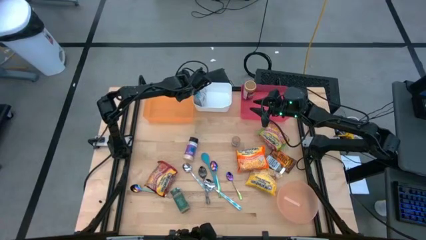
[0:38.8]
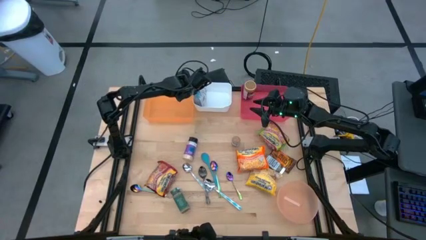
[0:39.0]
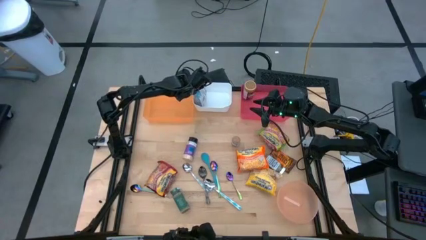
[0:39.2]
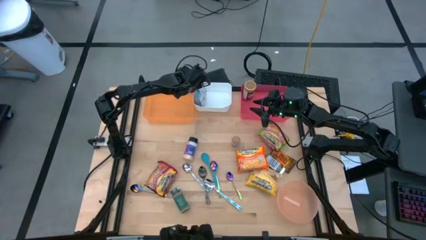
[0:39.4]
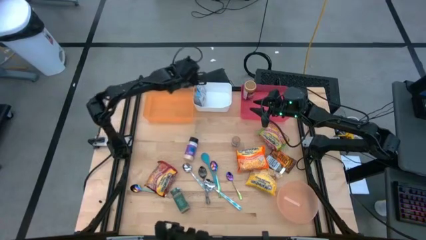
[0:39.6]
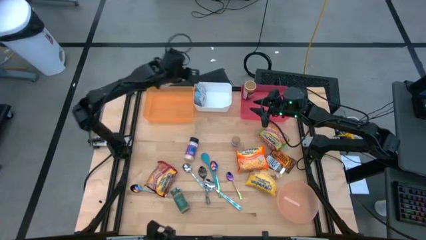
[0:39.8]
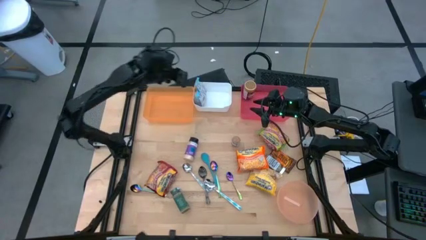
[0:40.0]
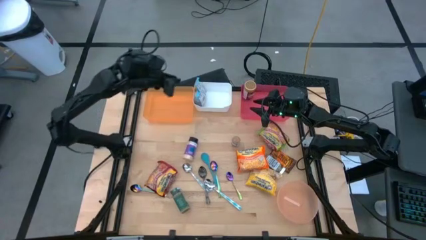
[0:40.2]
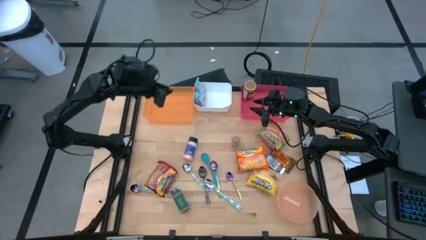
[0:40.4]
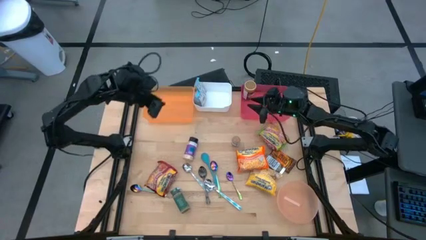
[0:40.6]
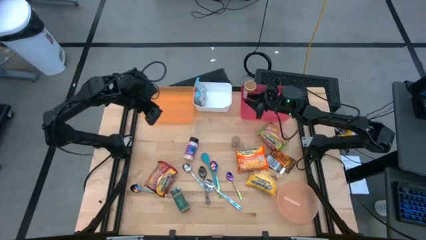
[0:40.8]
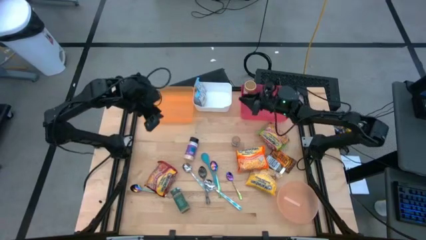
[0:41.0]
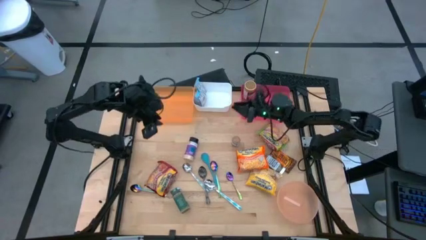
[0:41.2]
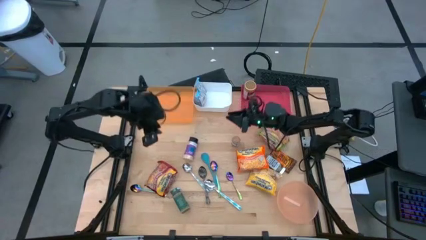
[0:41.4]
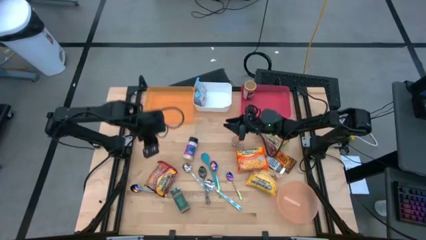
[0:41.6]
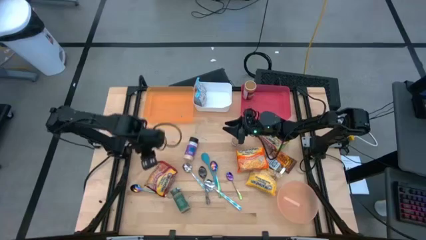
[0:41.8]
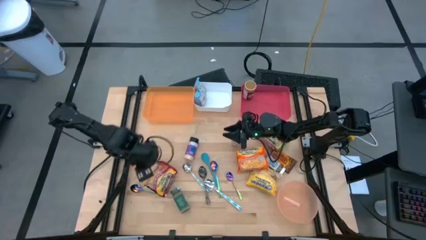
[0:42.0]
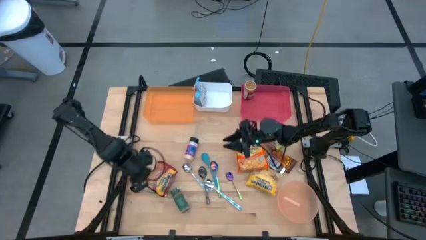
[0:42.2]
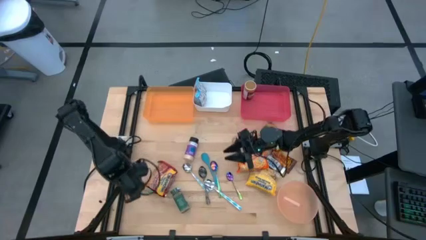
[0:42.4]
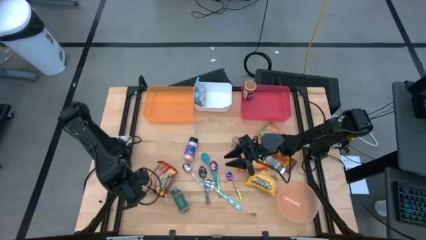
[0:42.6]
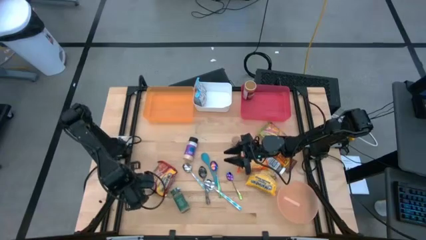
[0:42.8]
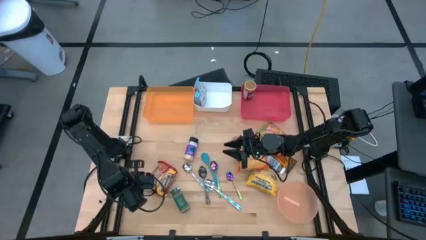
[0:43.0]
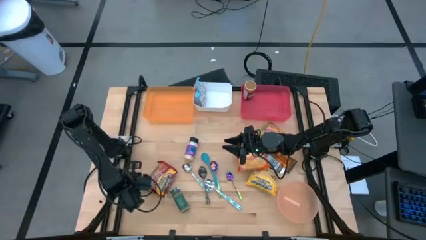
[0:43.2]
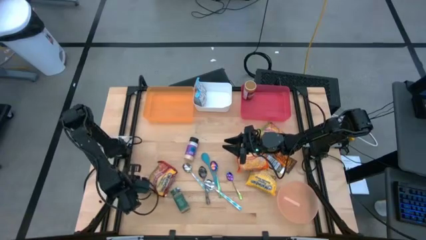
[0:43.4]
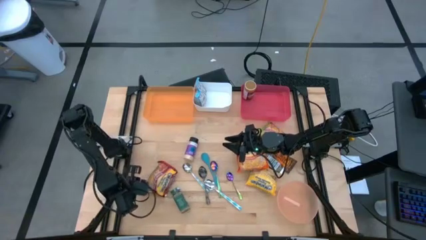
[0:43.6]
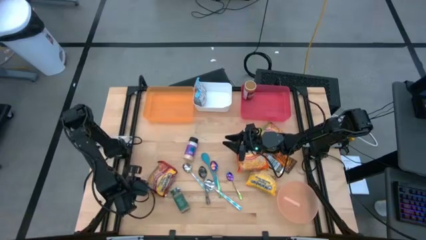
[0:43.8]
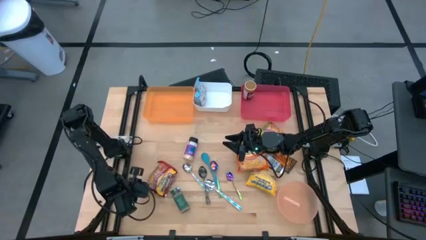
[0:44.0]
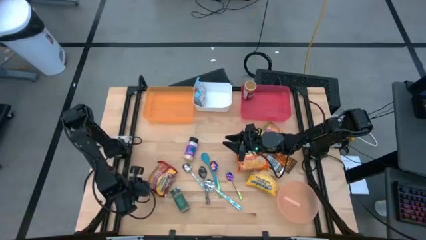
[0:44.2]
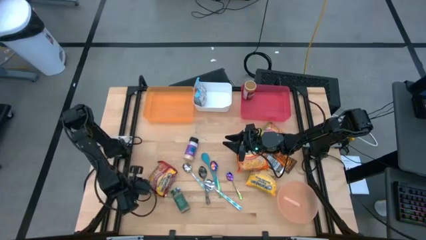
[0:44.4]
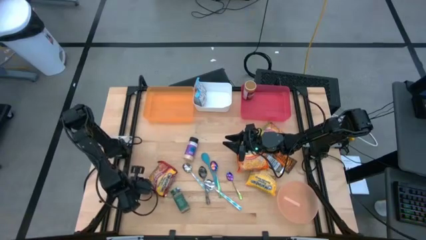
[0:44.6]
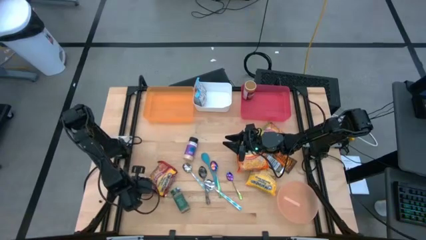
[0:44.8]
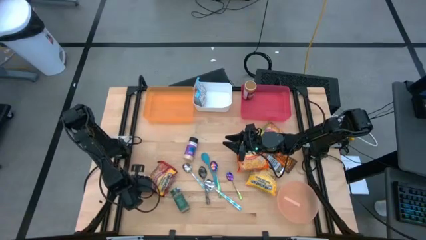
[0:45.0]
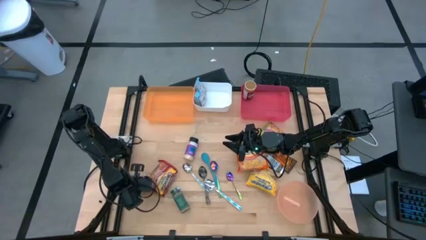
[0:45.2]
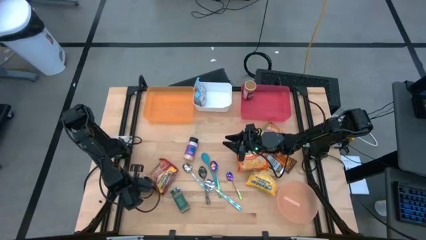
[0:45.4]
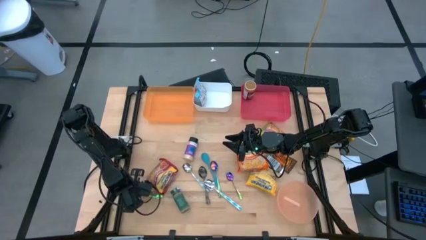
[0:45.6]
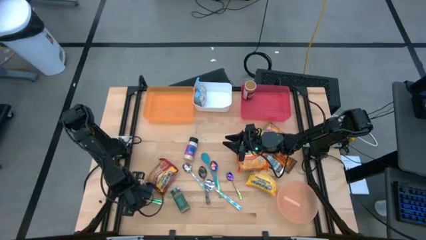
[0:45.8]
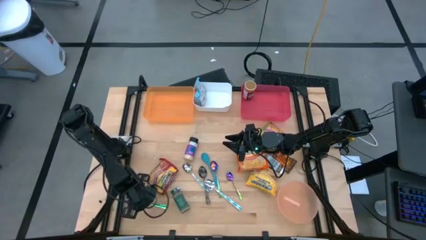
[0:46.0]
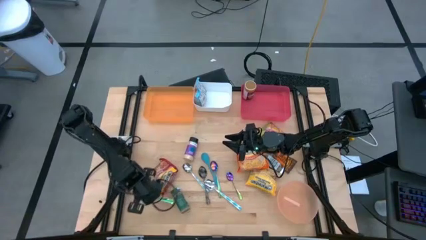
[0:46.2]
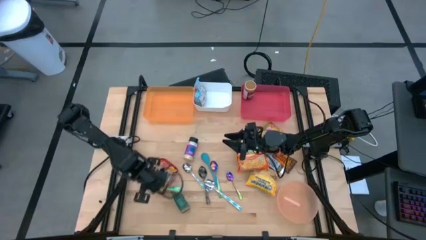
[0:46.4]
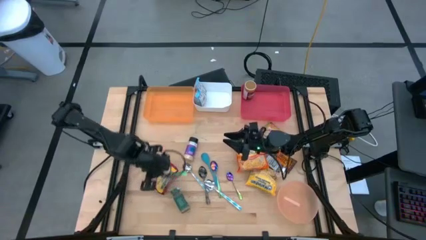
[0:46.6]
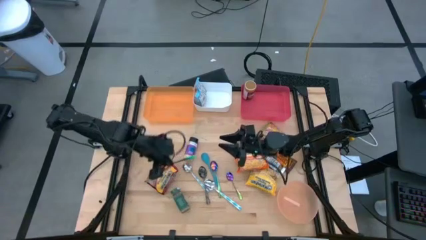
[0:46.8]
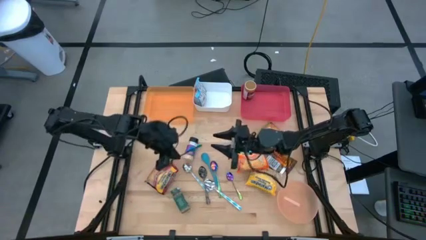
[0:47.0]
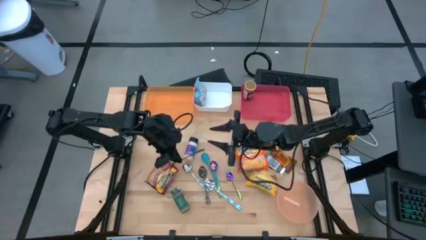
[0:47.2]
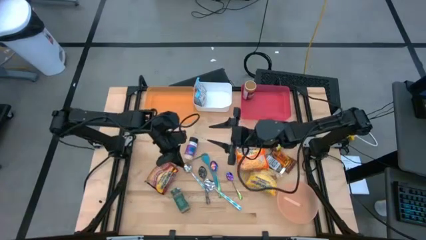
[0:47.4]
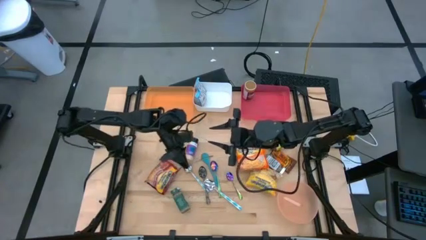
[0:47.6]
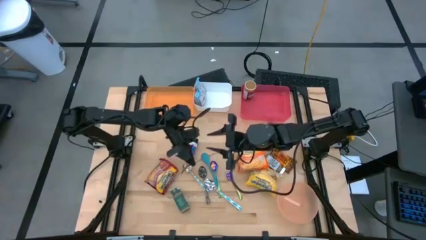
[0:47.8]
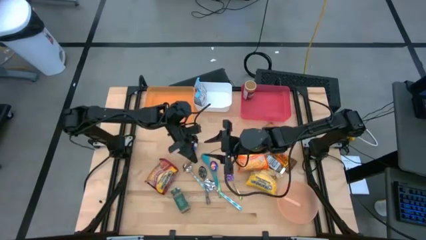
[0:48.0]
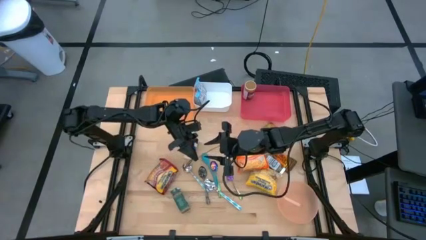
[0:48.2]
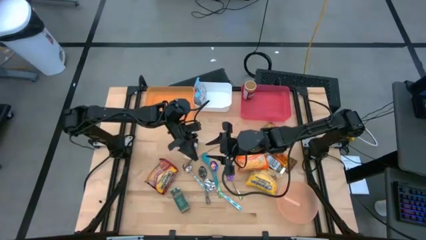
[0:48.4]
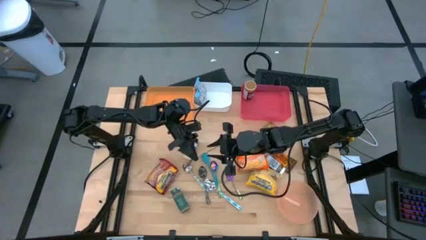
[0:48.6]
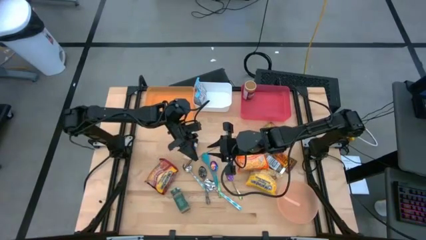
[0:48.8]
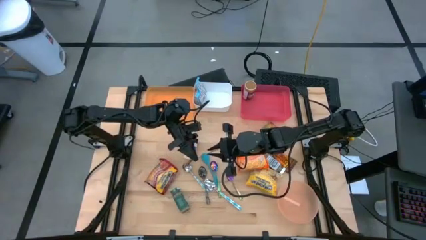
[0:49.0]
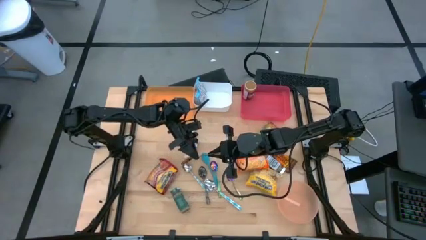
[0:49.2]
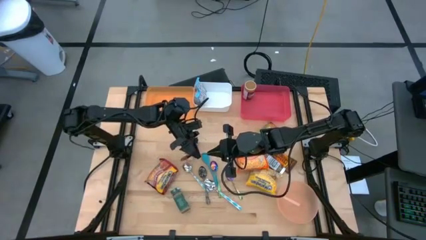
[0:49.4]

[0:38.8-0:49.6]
Task: Pick & Place Food Item
Put the bottom left violet and green spoon into the orange bin
